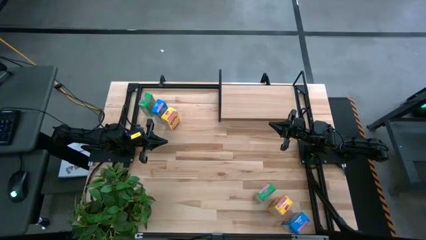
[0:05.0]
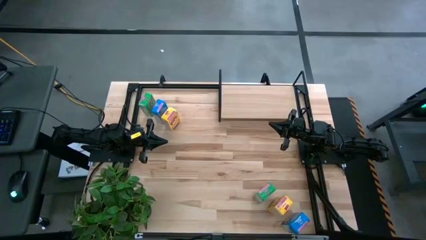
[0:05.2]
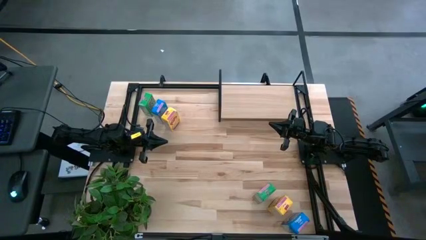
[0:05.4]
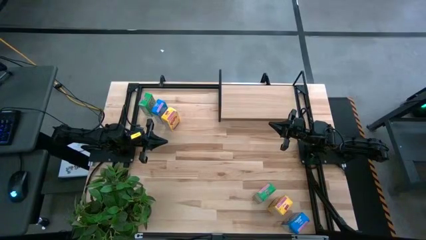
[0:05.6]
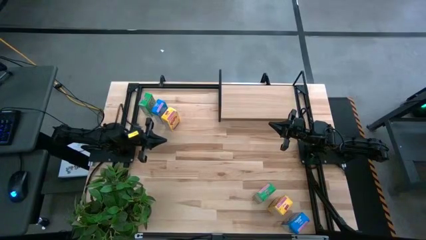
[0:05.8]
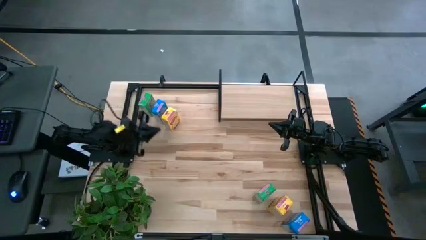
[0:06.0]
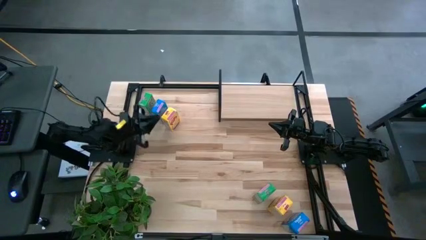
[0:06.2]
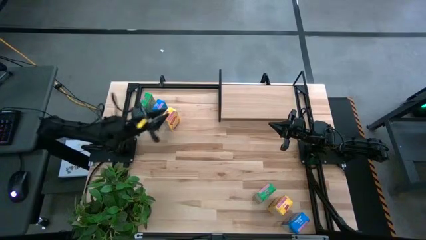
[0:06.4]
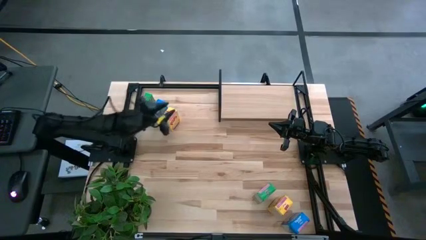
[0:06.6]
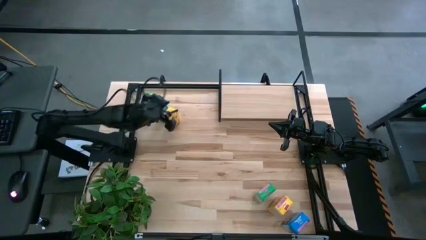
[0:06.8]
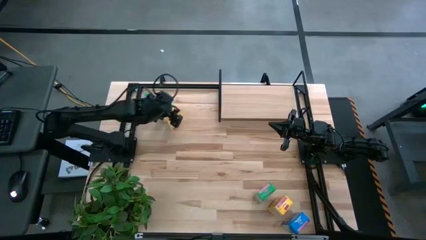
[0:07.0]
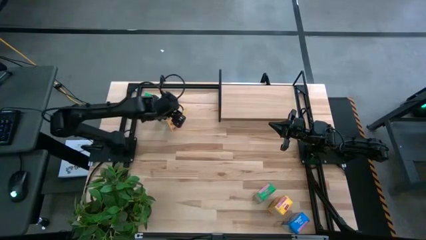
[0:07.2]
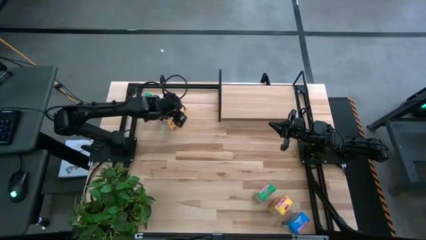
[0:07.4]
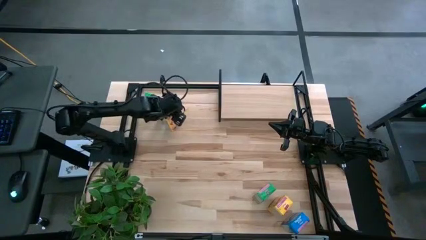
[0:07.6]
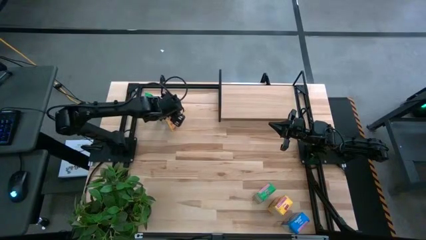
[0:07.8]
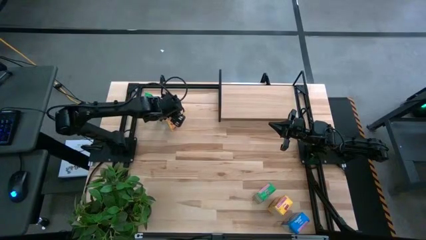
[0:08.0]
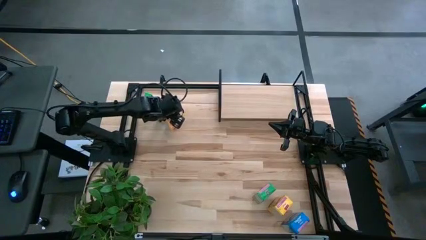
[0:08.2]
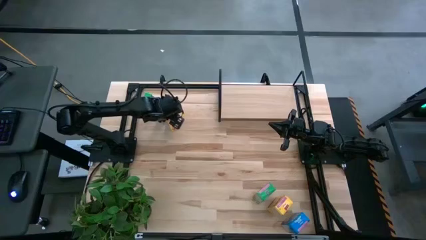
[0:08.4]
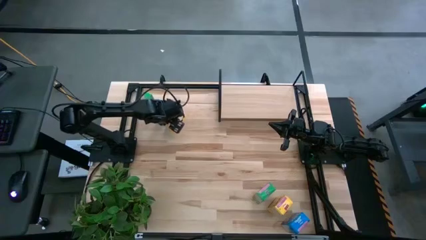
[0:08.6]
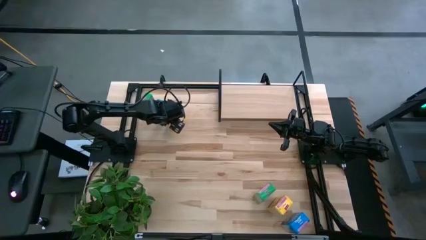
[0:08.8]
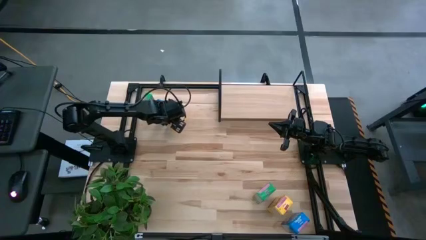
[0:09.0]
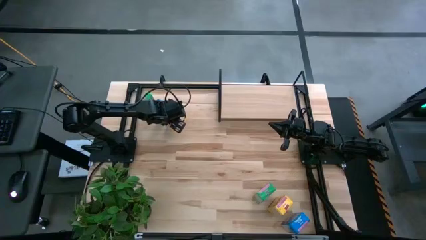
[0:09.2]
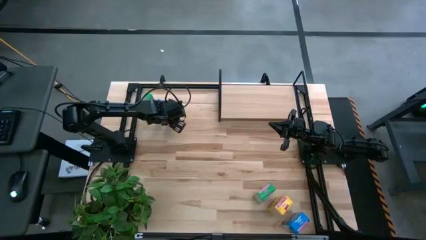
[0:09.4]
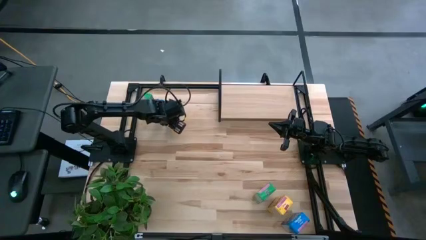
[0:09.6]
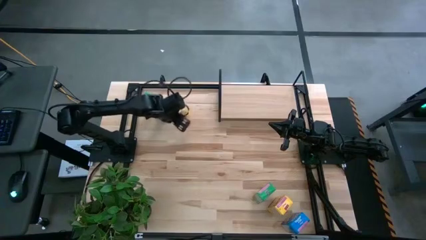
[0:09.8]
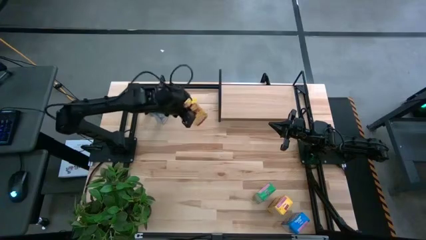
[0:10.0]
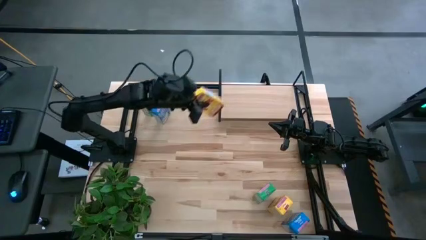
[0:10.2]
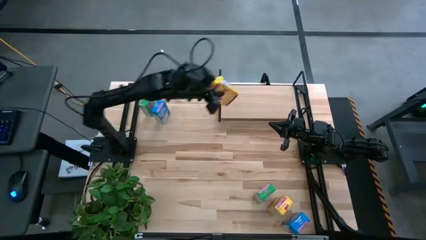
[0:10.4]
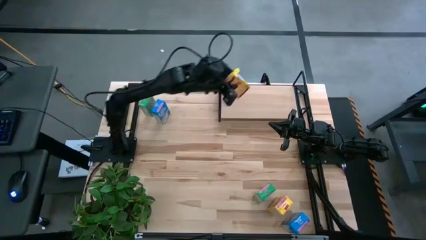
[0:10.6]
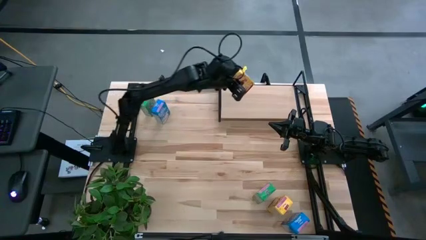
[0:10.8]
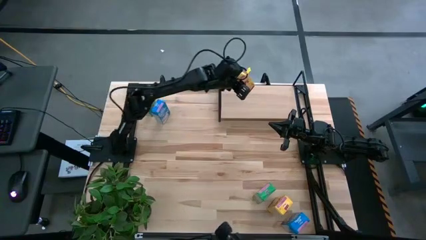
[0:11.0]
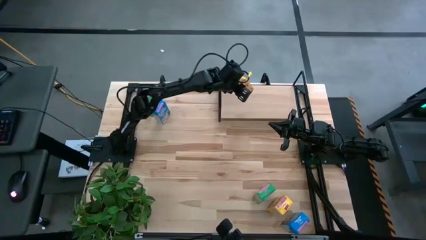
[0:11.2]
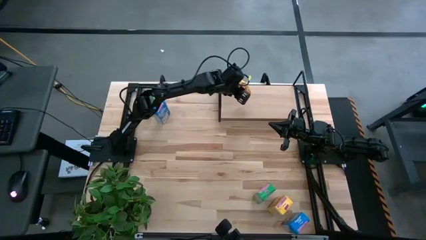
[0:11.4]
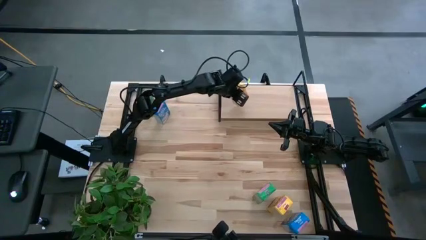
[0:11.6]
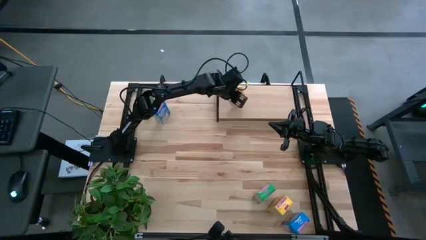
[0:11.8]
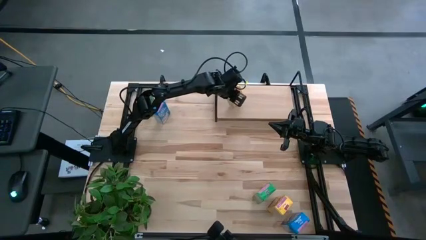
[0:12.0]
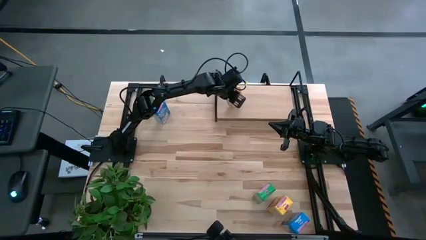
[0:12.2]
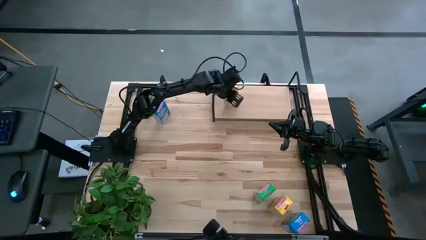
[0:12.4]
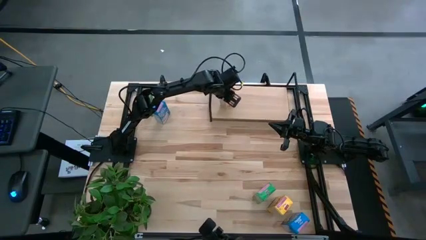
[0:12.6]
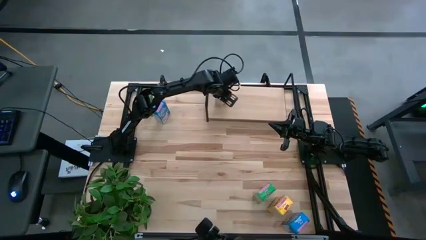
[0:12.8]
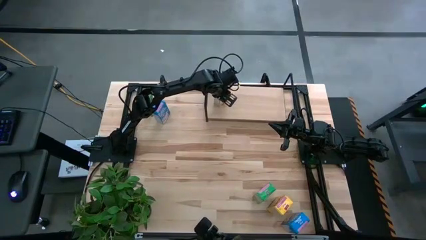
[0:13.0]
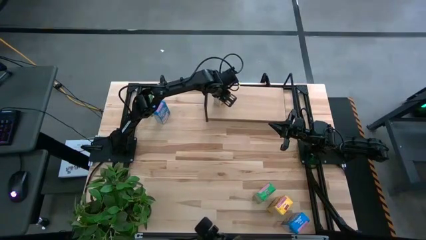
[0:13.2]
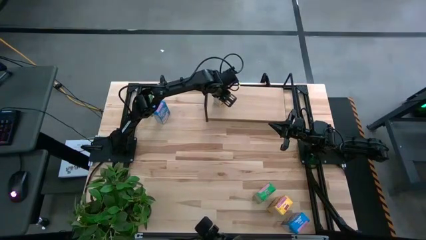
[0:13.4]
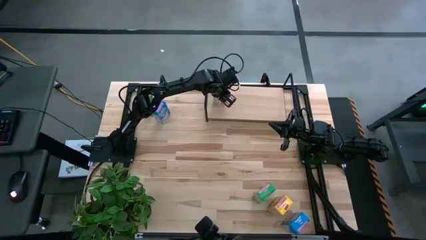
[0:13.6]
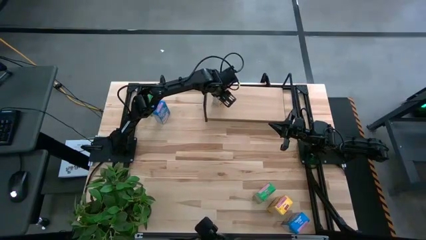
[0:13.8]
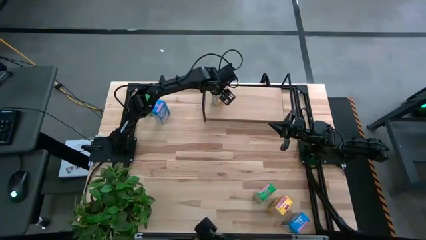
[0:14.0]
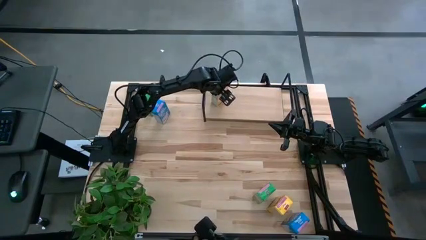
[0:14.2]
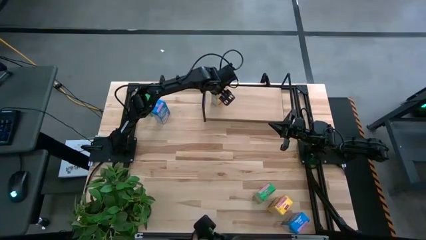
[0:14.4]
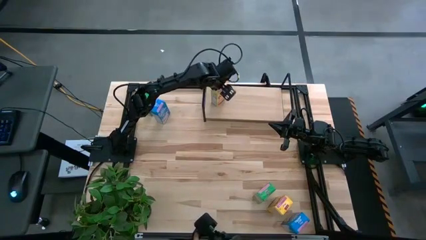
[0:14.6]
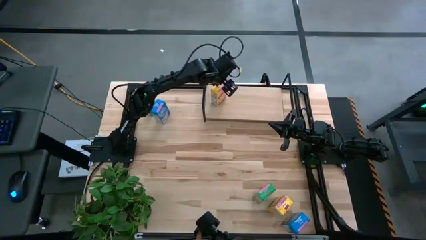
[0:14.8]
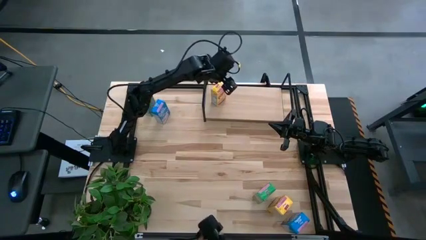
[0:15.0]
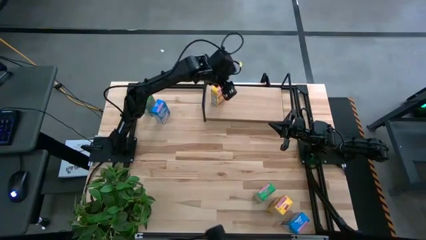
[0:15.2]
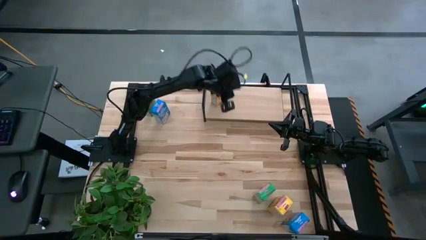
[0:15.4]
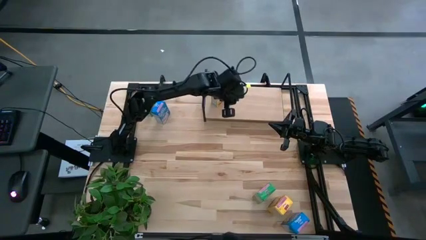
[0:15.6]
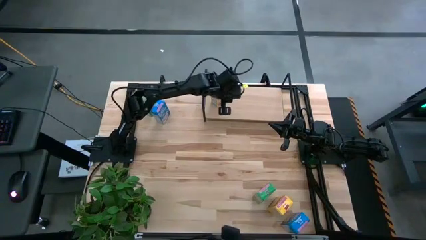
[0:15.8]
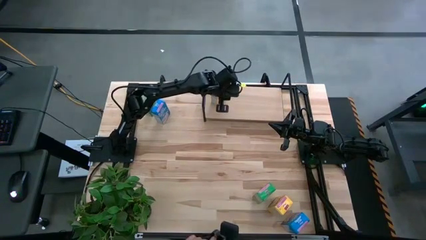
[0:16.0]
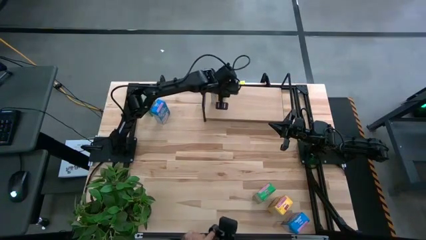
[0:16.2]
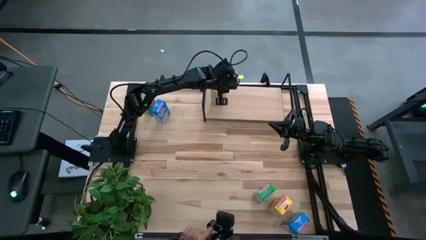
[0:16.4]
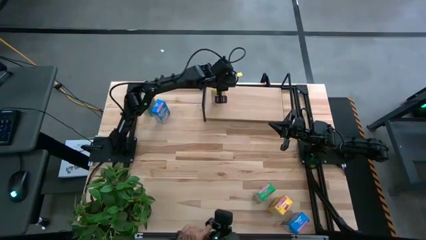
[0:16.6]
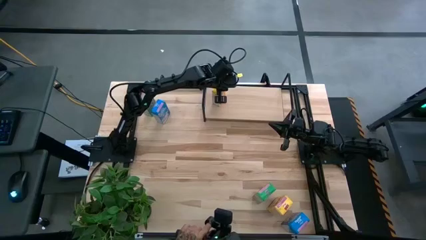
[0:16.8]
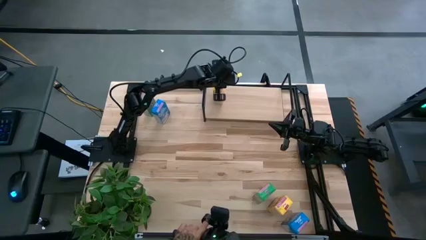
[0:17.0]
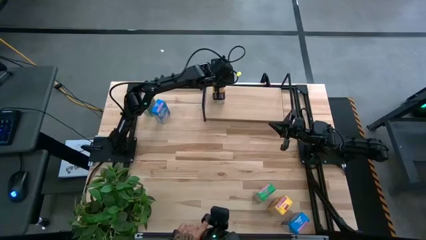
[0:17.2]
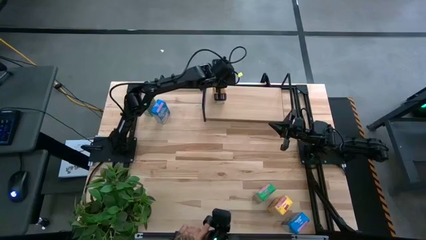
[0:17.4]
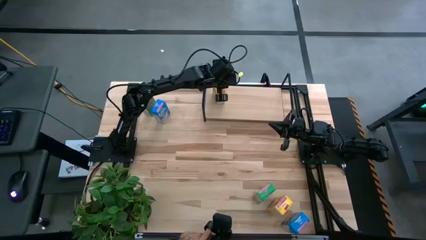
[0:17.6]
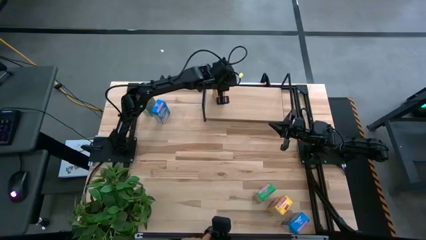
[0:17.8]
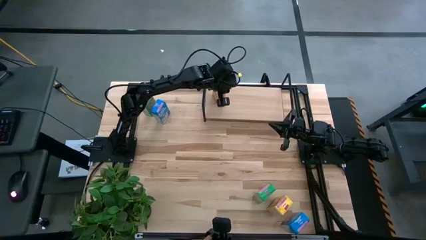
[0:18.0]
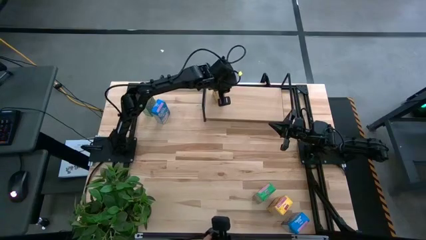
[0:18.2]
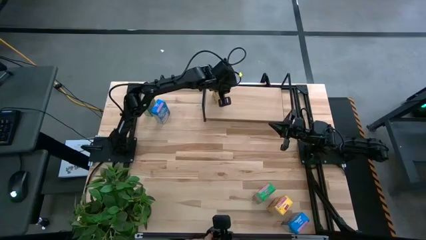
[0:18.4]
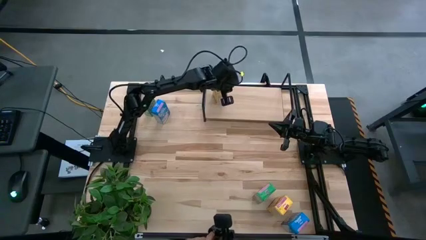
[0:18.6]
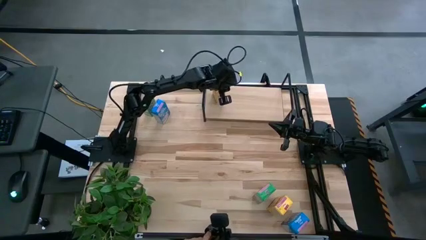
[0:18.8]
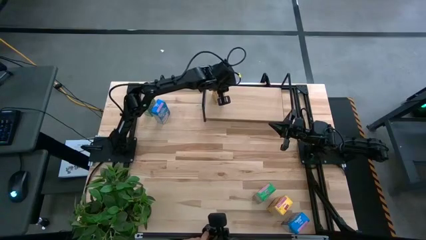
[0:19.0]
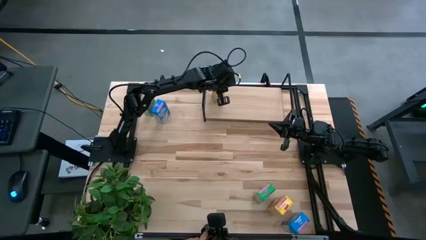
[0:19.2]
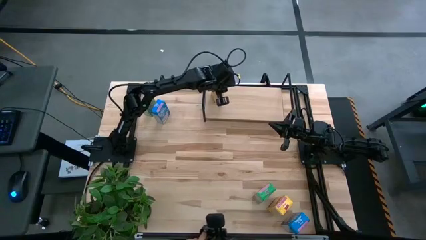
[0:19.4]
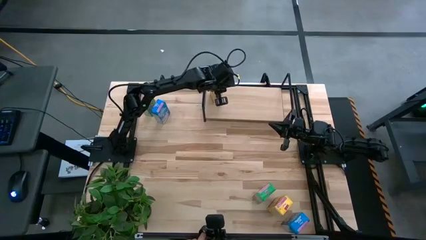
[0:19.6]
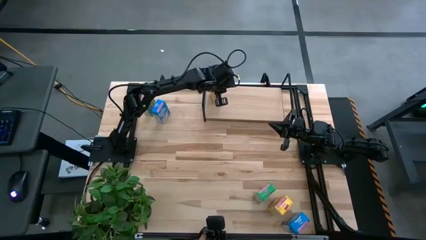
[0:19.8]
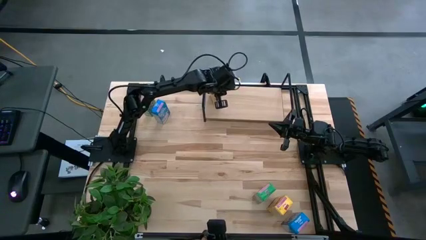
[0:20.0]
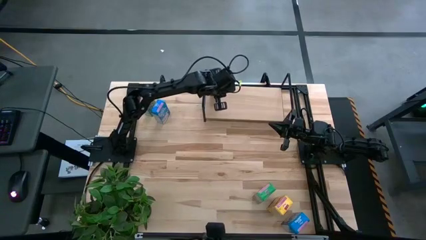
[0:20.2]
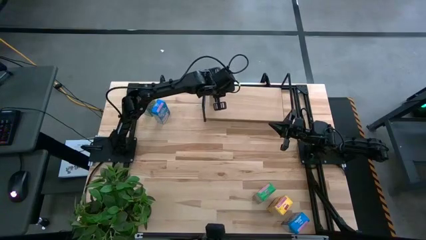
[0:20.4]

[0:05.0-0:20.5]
Task: Stack cereal on shelf
Put the top yellow cereal box on the shelf
